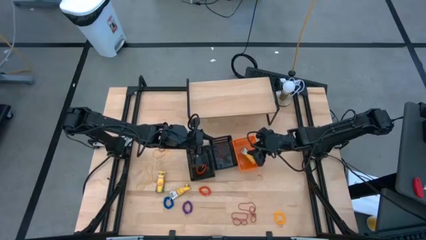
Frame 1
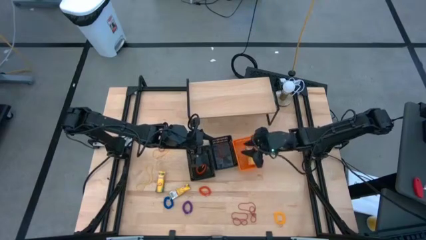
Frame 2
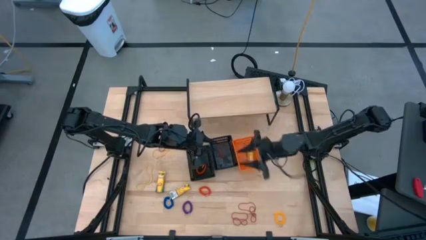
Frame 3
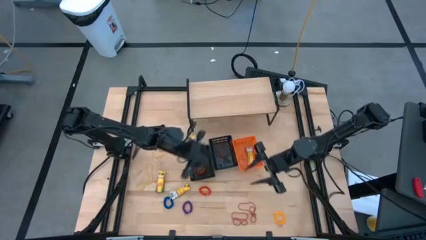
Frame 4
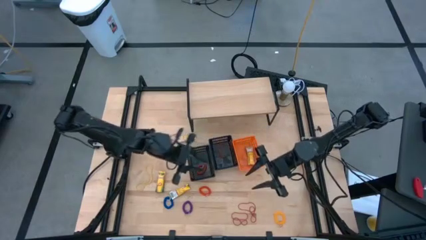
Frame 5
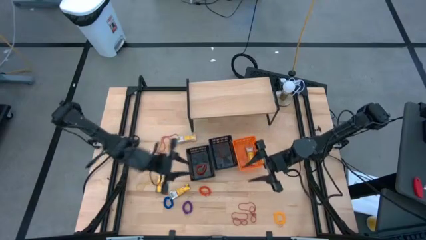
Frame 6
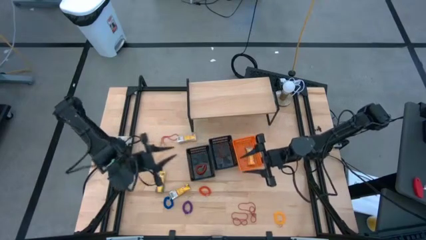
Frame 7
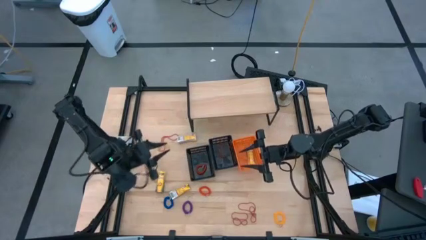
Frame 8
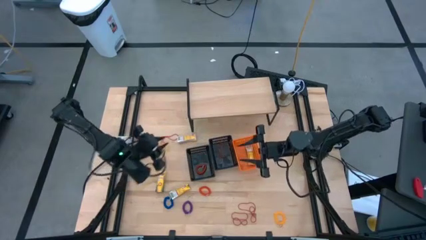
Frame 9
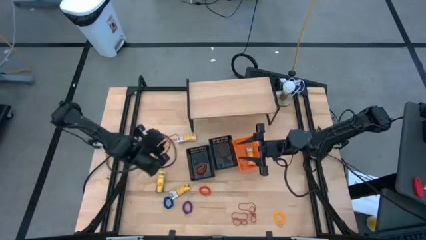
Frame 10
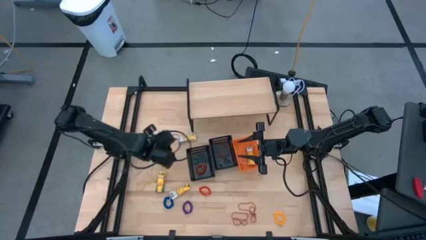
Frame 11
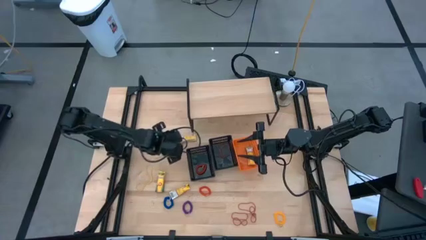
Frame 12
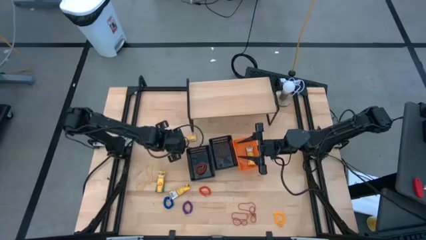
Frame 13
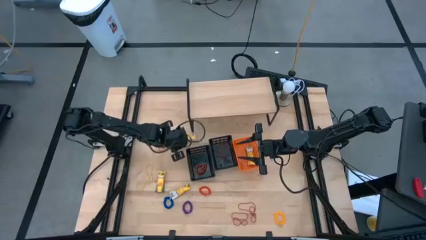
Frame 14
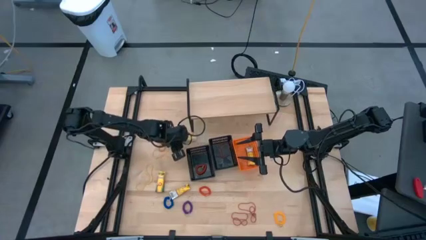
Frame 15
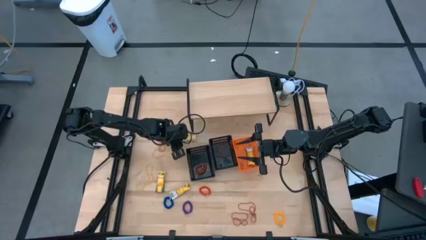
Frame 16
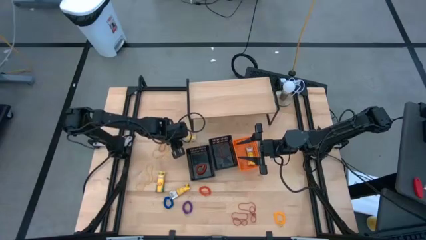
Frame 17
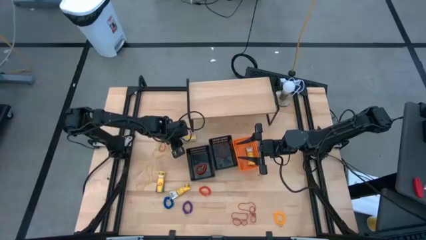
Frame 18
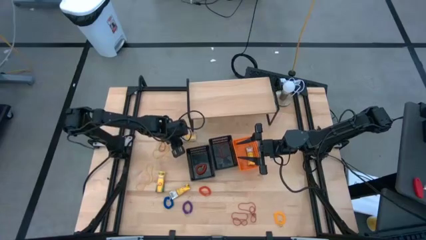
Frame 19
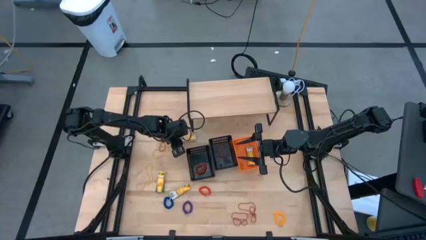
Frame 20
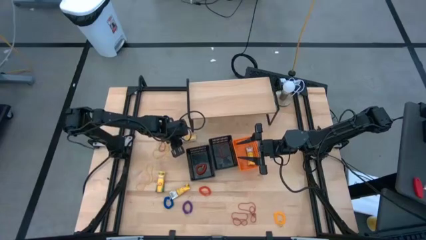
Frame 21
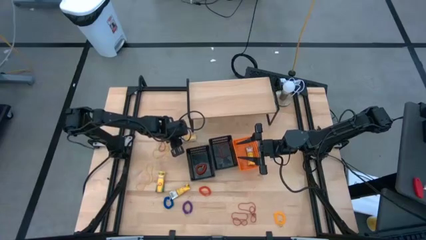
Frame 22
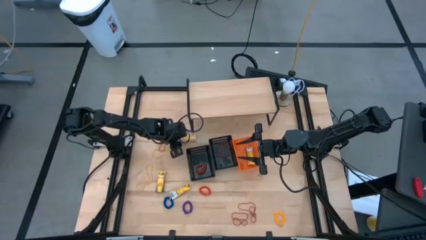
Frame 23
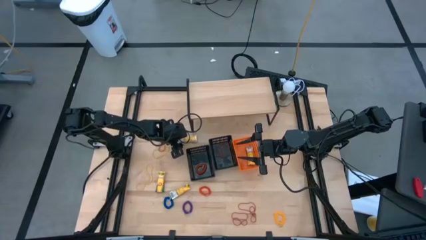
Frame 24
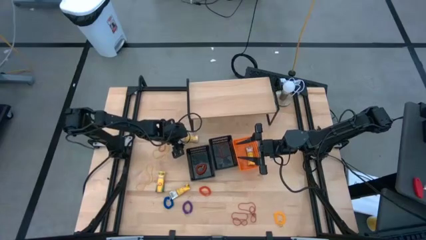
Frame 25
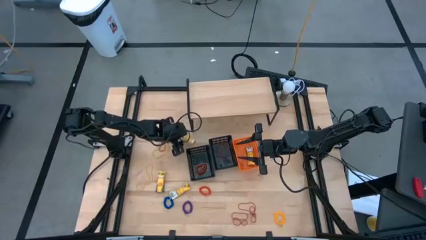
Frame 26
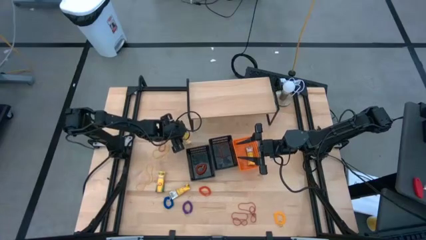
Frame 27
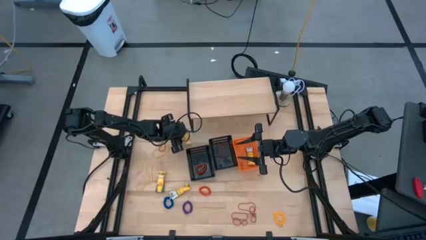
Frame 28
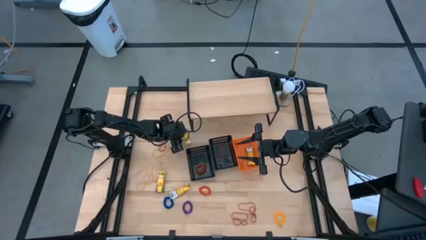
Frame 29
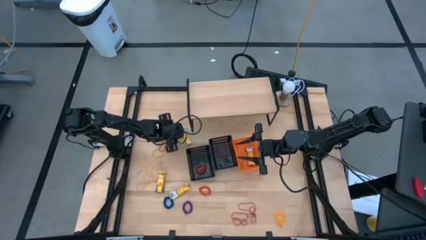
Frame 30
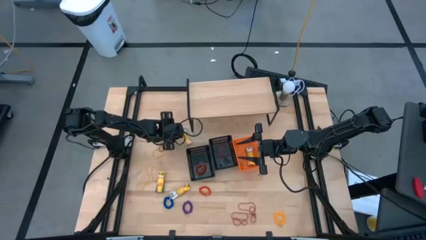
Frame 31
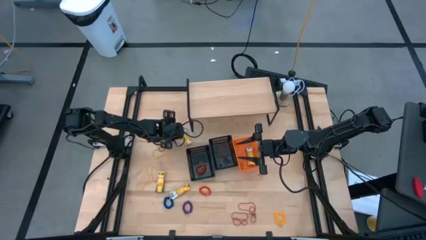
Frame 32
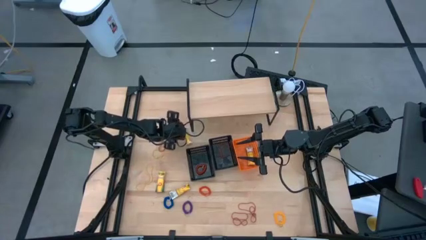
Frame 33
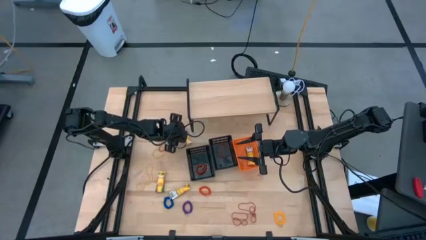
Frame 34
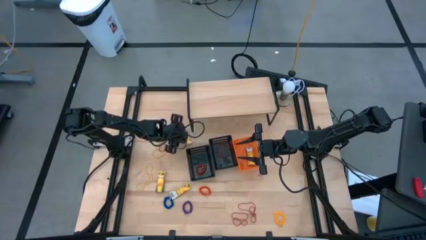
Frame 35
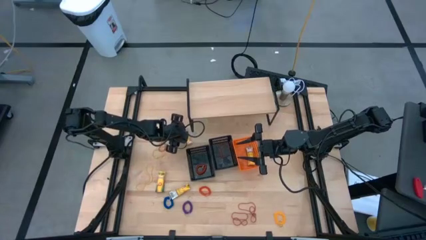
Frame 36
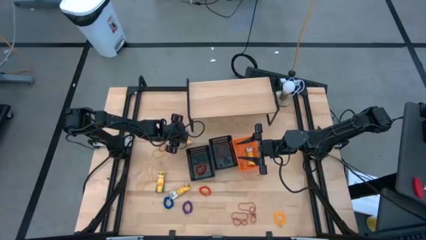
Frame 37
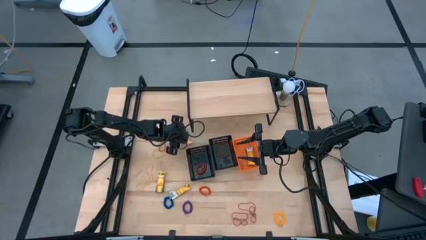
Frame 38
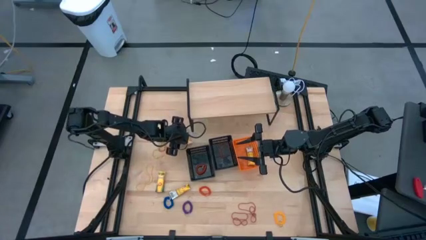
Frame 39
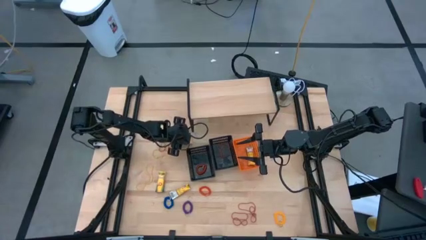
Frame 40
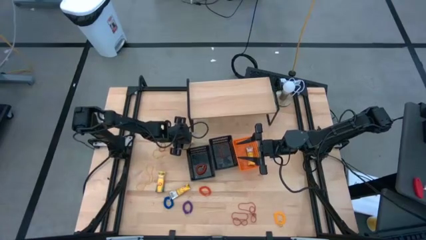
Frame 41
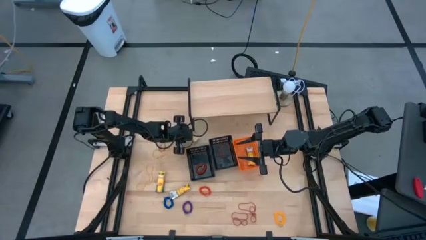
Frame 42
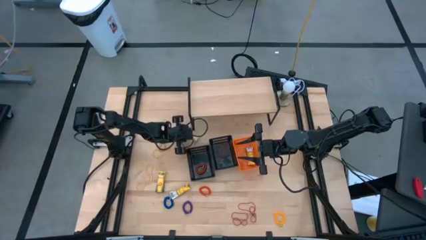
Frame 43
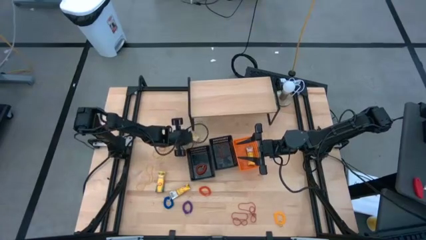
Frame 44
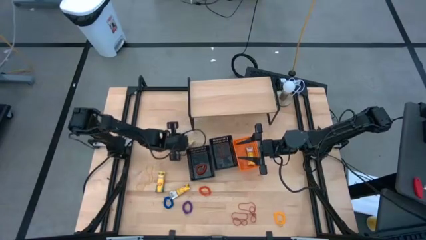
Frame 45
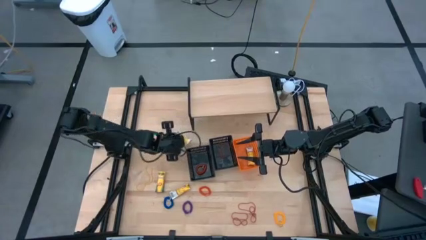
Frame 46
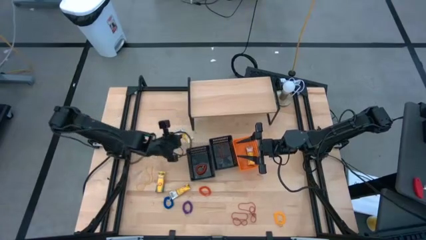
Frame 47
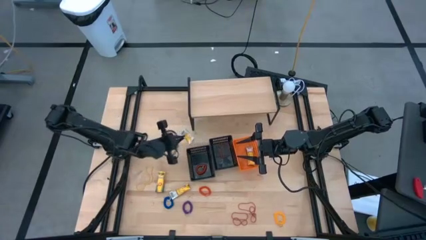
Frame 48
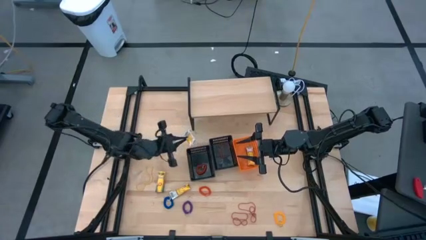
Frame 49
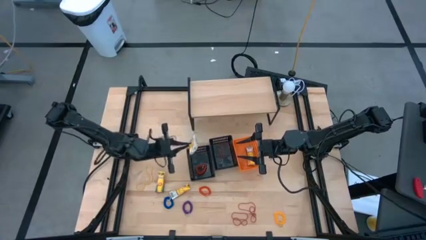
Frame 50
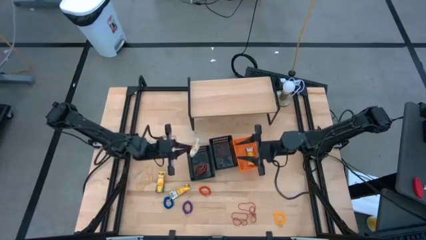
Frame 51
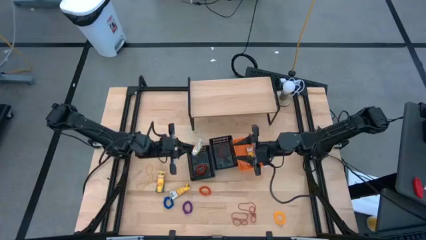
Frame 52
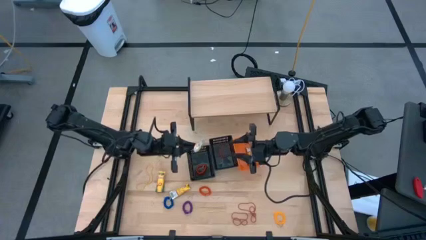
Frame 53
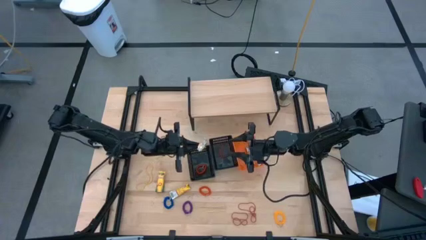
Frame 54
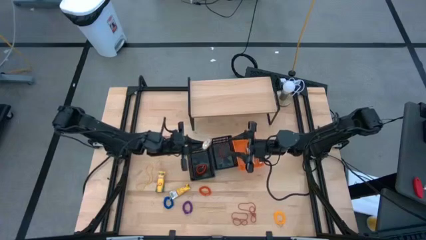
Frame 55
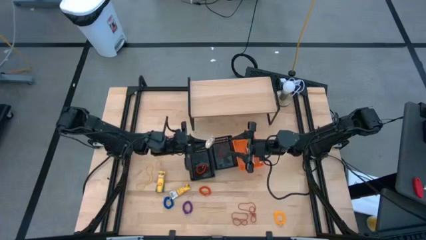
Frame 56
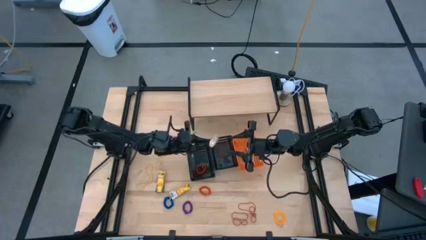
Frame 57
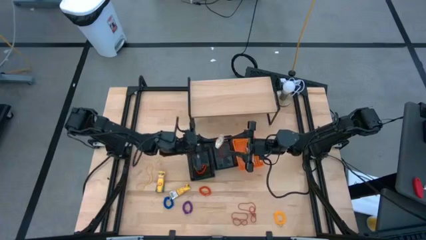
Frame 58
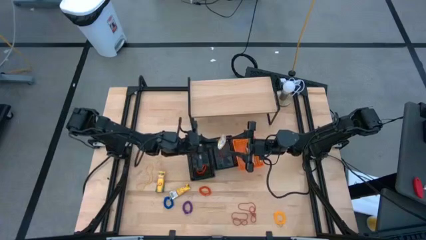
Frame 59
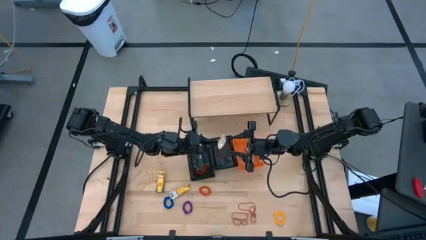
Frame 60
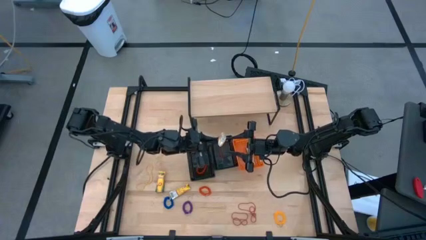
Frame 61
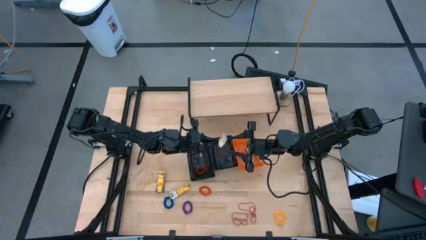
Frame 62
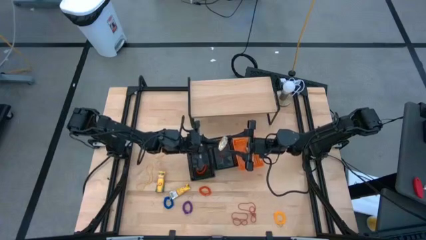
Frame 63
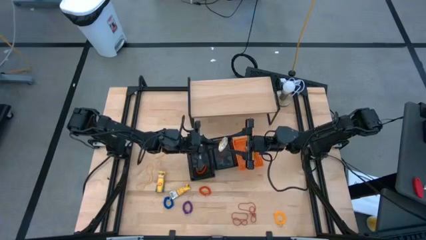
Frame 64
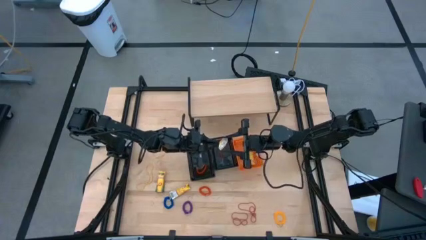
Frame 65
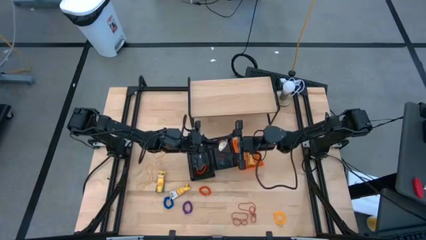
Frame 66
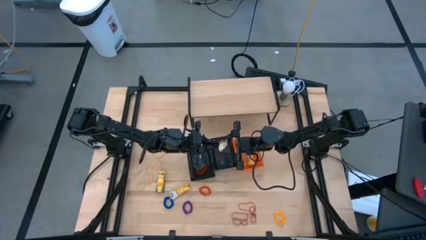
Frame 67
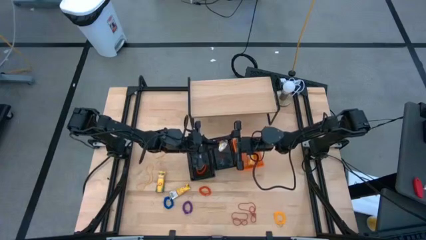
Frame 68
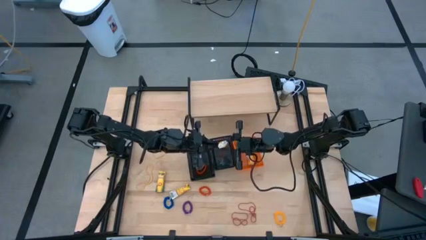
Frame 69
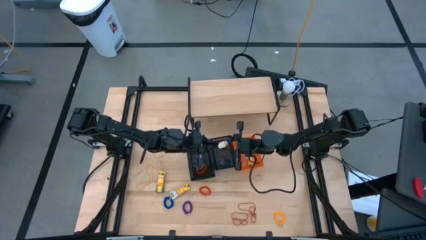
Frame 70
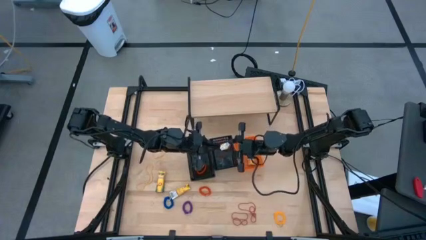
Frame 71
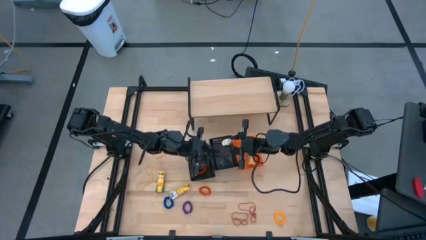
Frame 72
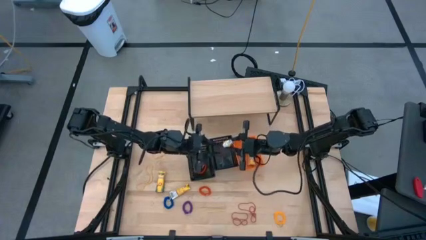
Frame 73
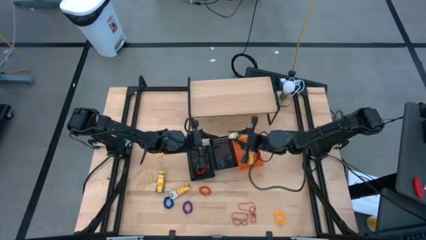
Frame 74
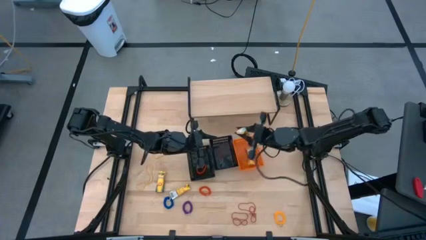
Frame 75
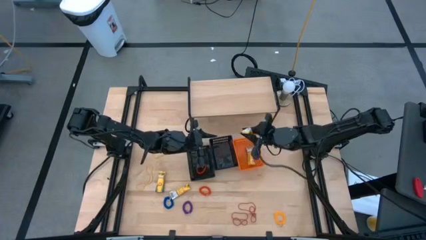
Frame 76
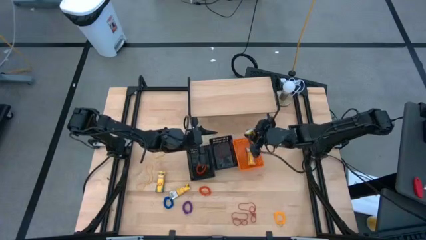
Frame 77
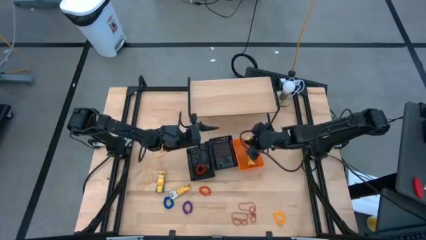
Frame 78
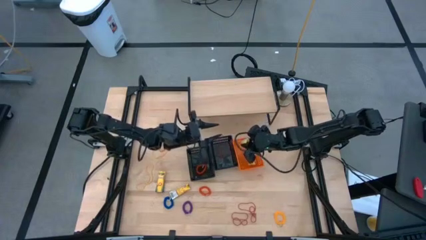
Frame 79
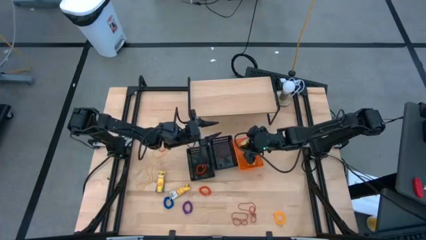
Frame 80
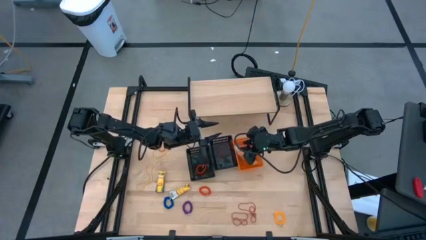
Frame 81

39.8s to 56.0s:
Task: Pick & Place Office Desk Supplies
Put the yellow crayon bag into the orange bin
